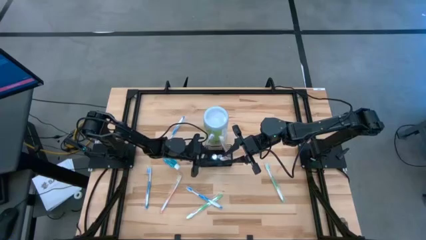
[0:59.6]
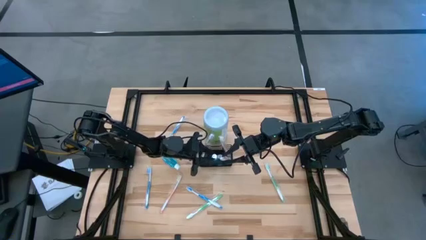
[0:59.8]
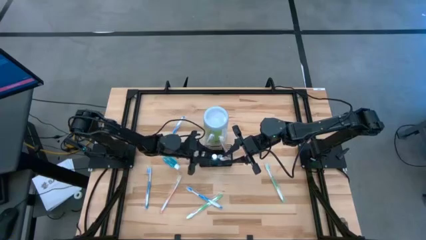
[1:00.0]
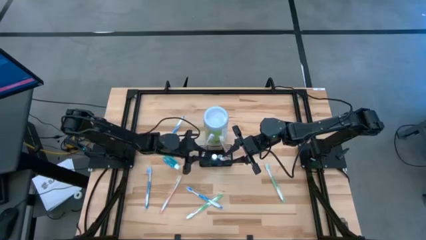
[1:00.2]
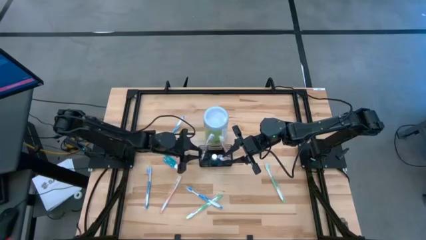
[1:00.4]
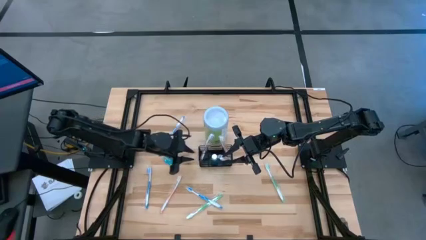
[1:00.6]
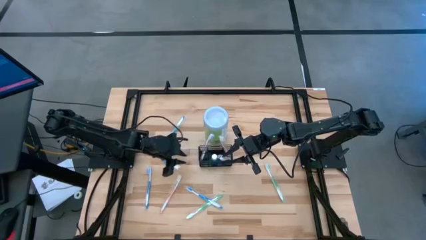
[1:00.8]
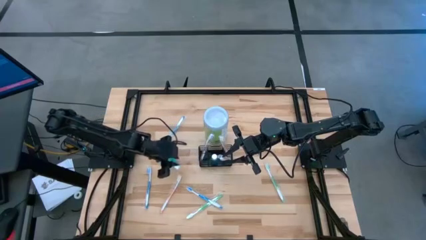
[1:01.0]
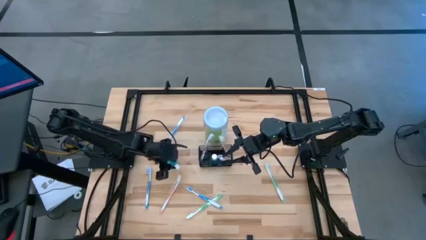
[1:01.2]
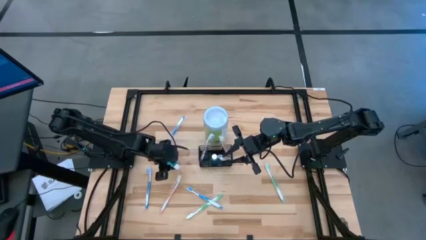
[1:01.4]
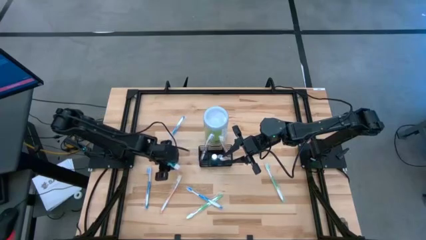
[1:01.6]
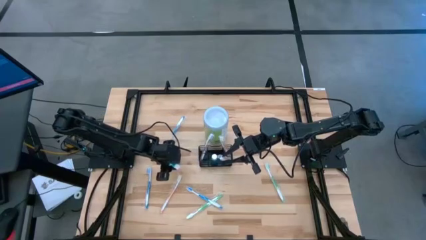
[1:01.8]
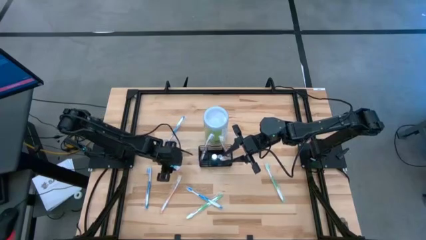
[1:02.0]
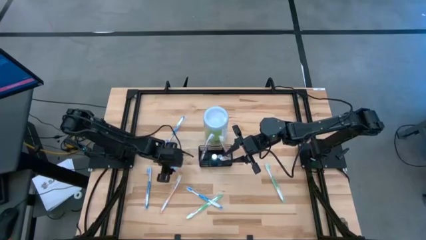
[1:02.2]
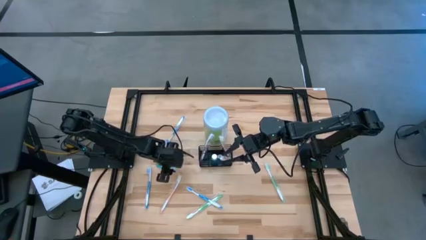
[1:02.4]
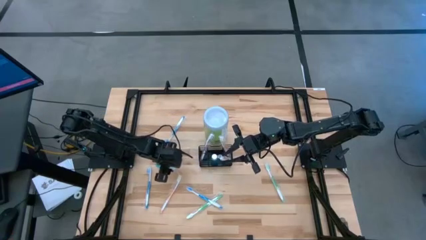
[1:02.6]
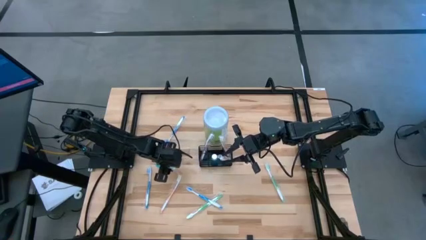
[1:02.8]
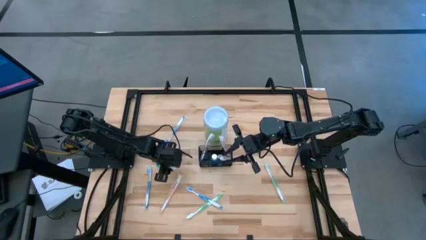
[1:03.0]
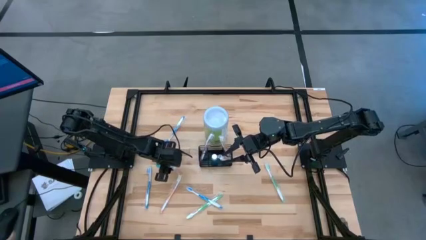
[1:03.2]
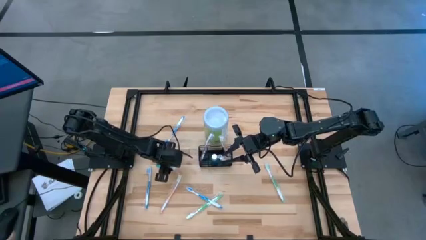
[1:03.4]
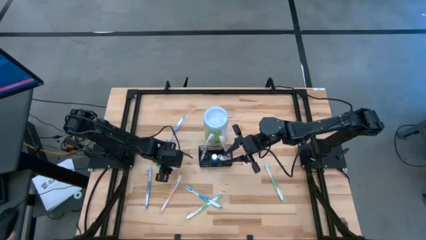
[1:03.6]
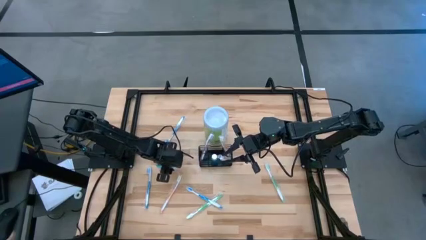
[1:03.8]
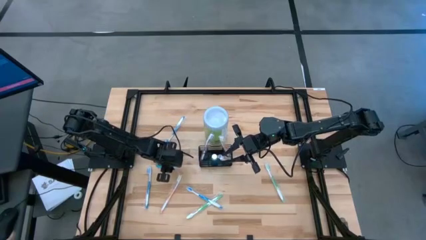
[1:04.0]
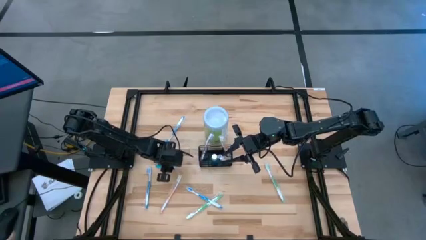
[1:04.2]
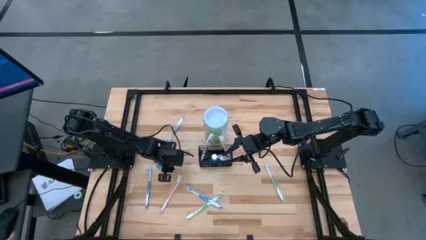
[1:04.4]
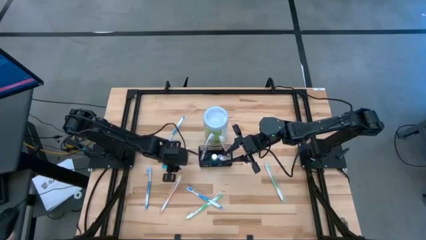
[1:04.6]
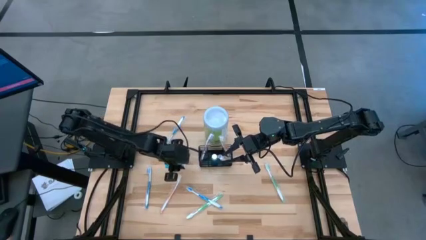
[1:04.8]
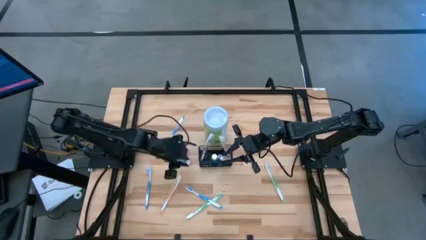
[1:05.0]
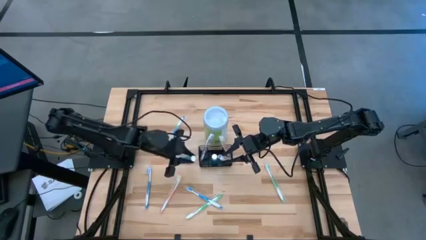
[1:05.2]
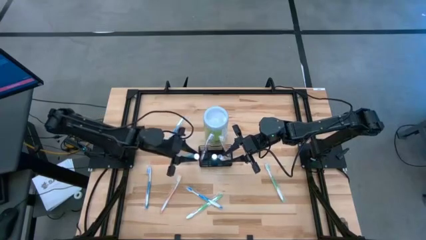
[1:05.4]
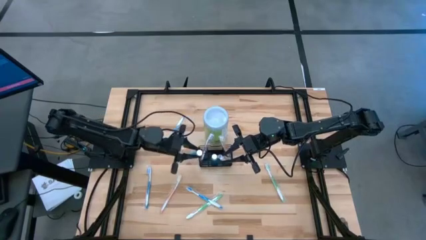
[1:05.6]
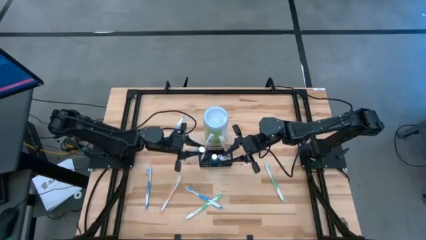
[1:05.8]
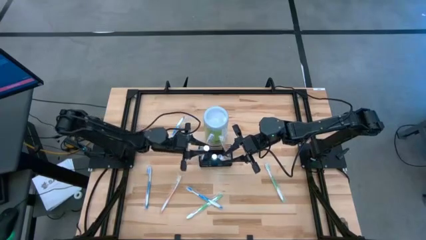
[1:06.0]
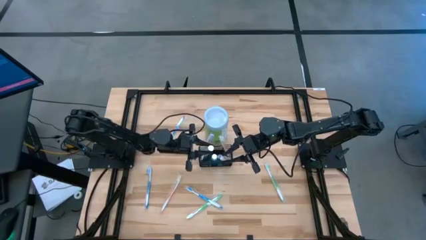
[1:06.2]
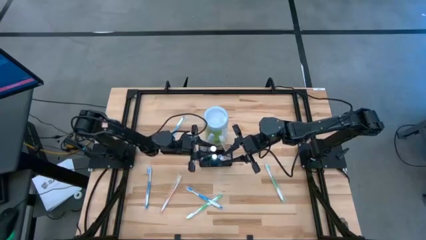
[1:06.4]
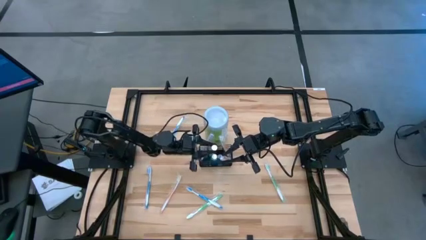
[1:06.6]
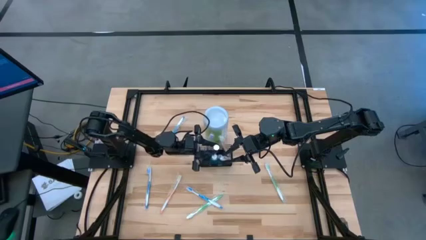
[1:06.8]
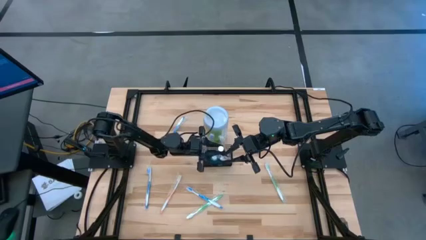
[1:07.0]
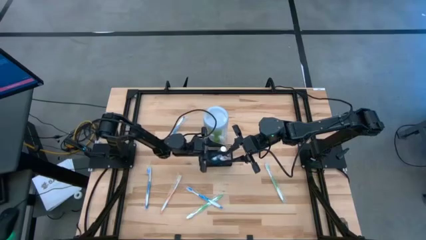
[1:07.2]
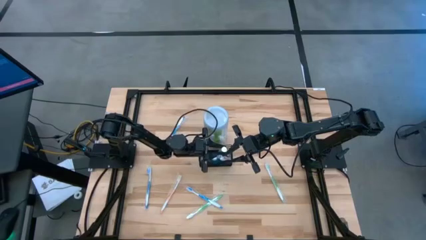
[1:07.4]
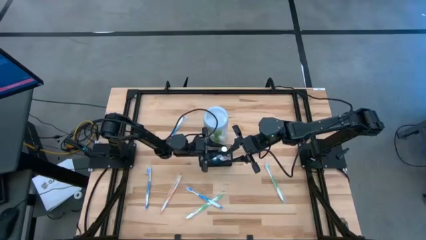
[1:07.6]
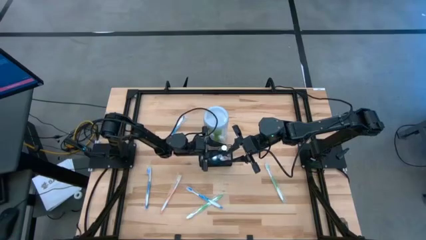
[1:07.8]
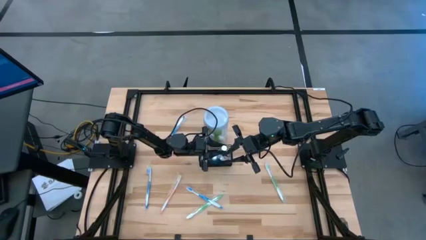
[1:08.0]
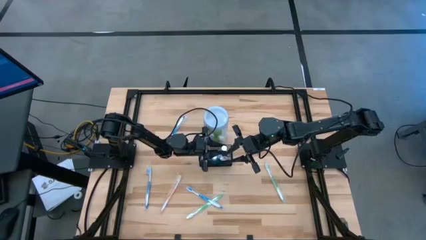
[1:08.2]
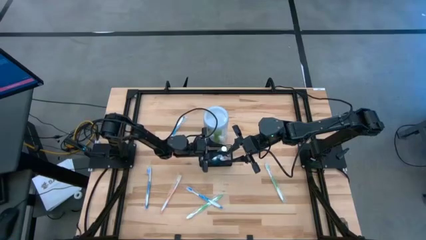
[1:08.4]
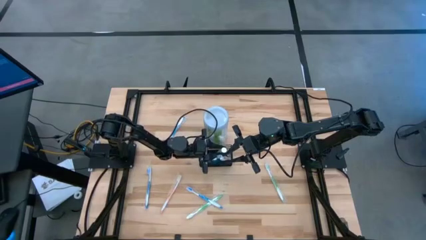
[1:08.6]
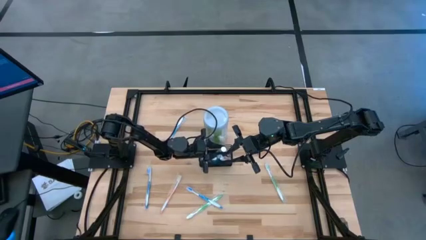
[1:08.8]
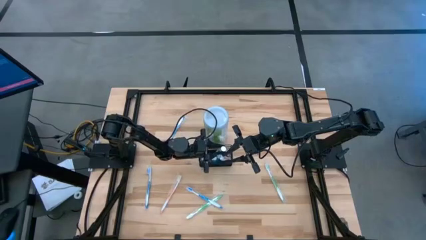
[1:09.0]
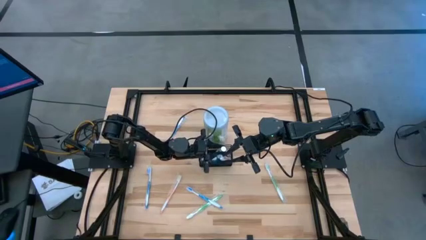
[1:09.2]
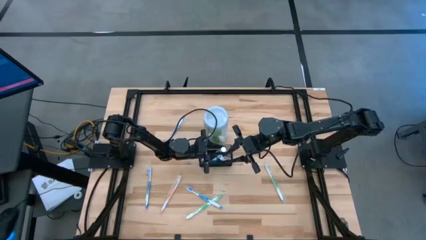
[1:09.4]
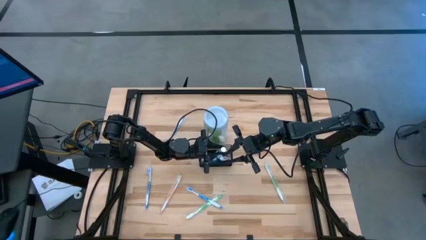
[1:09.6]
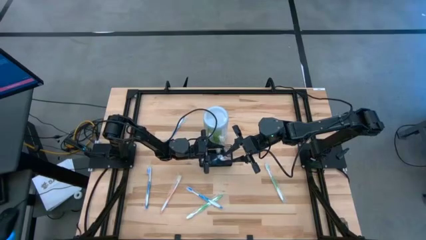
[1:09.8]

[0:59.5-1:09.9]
Task: Pick & Place toothbrushing station
Put the mouthwash into the the wire organizer

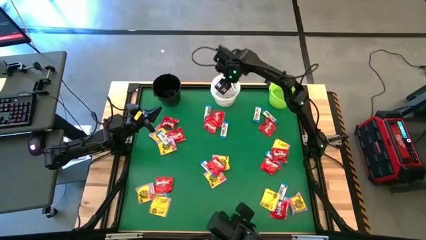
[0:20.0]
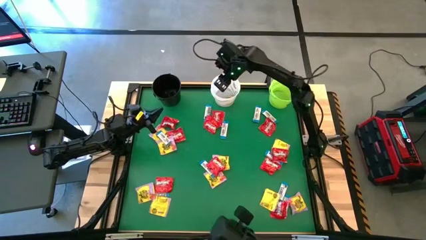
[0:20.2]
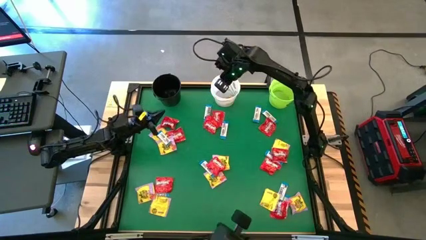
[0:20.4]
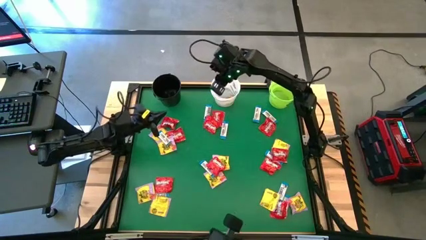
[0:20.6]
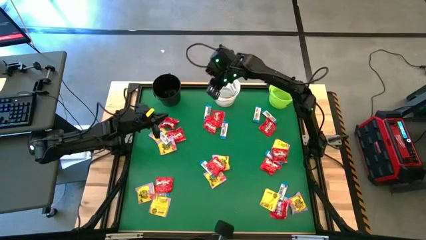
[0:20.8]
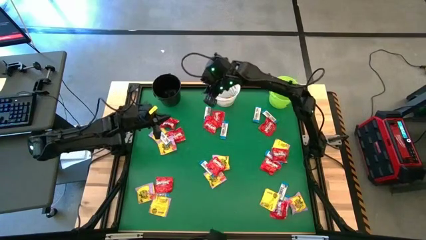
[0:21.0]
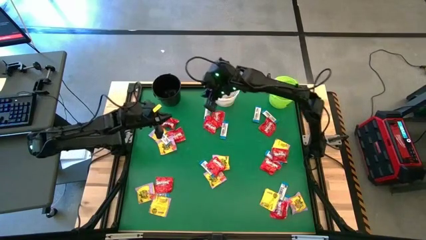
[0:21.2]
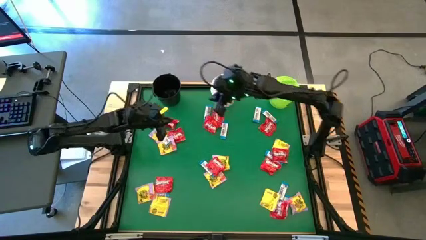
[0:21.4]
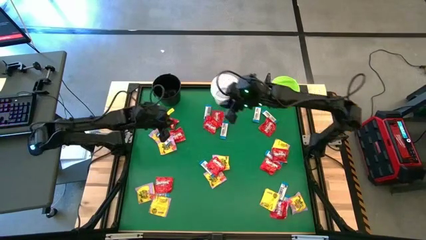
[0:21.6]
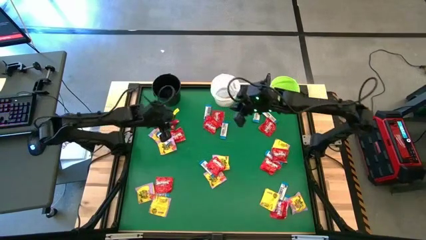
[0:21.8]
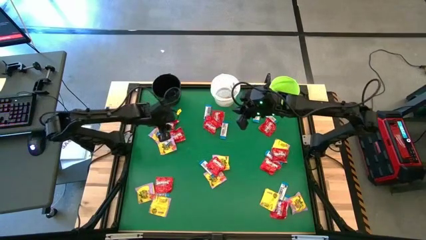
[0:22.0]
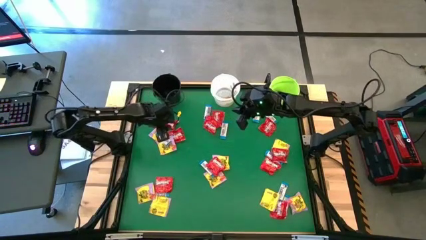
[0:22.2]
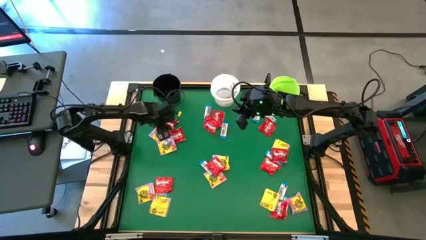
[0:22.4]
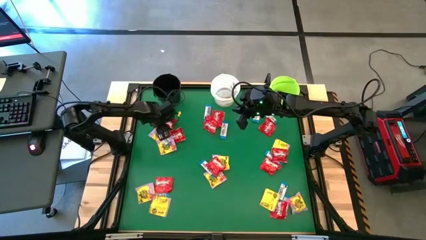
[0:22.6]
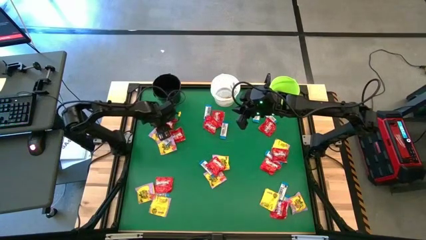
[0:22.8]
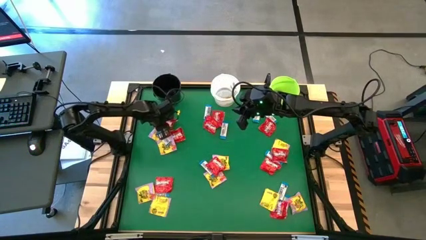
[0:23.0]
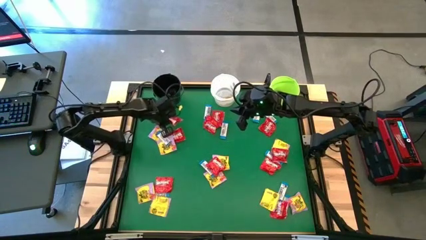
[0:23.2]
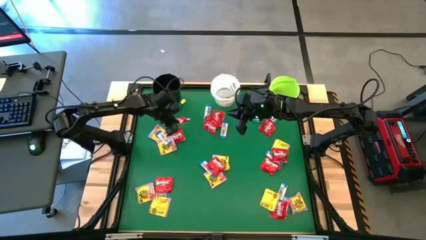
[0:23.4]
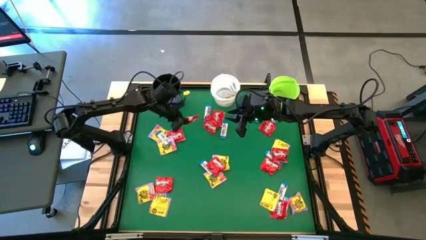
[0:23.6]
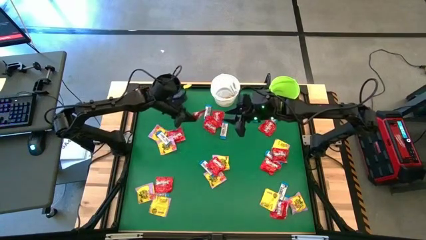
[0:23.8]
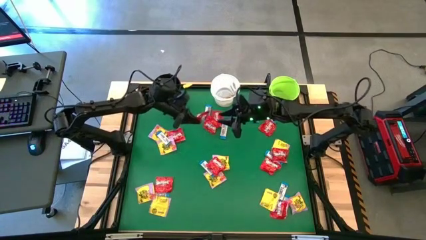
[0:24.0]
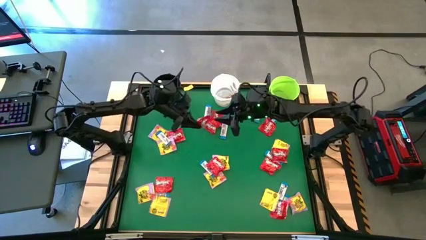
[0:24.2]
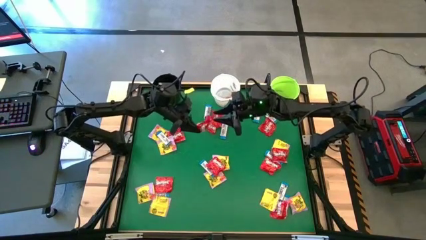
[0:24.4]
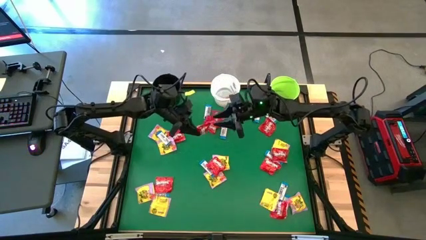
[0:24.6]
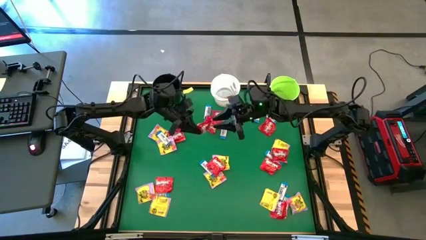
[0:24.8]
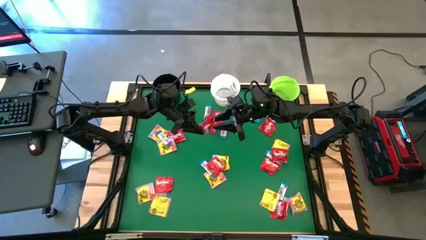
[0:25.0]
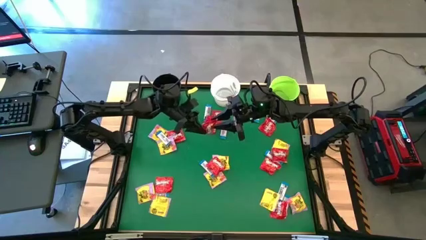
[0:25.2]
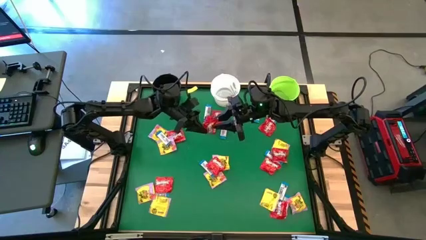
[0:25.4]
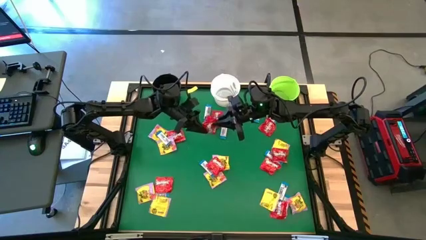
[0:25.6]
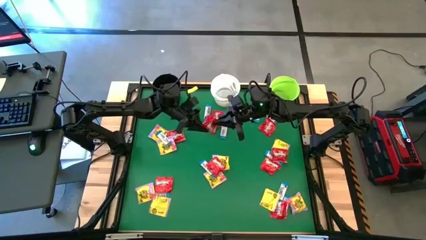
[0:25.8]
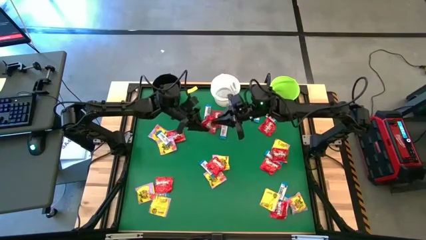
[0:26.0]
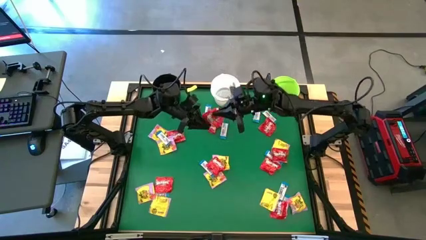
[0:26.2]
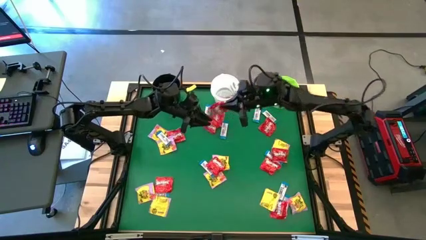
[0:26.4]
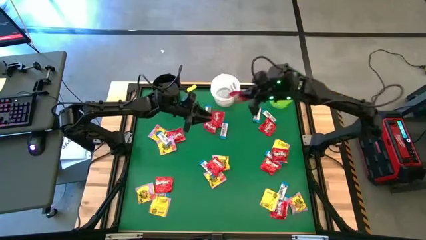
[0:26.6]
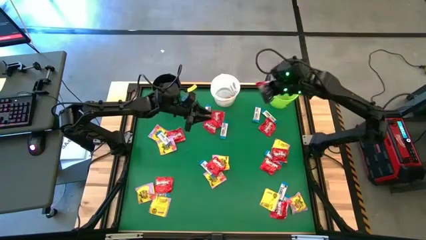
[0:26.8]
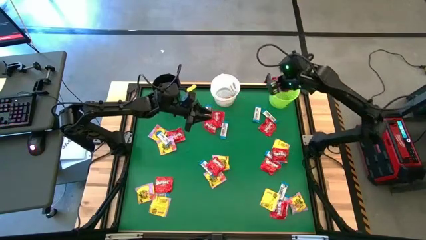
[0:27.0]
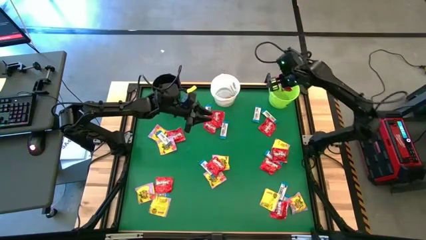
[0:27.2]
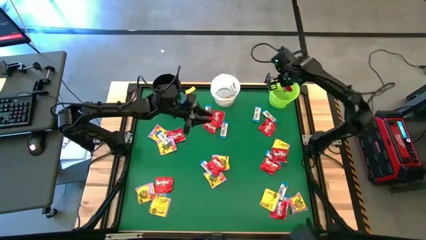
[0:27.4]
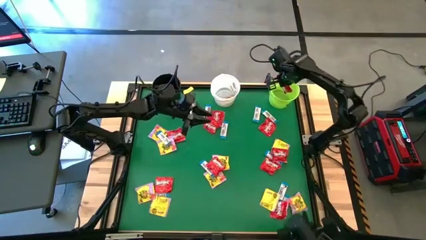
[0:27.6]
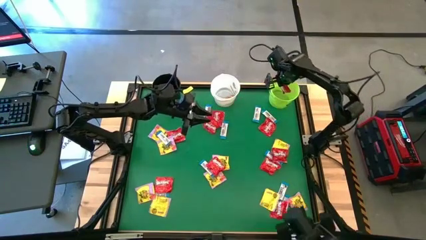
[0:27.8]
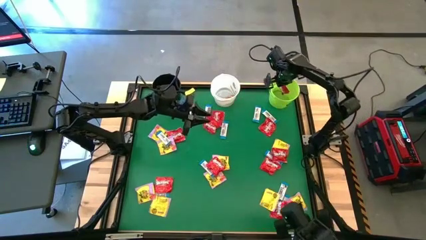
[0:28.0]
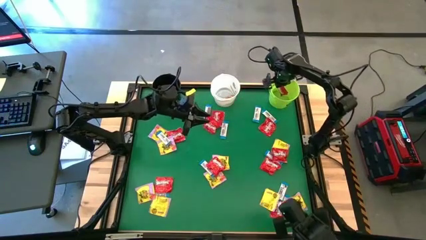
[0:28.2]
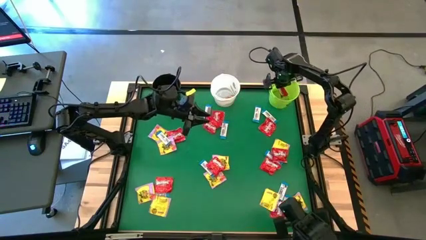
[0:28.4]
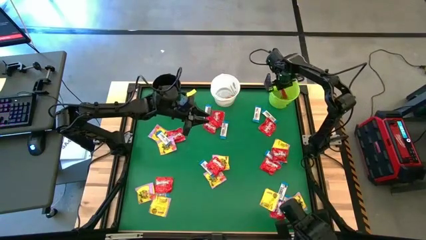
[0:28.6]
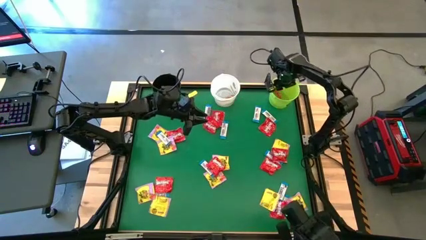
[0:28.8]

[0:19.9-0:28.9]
Task: Sort candy by brand, put in halloween buckets
Put the red candy into the green bucket
